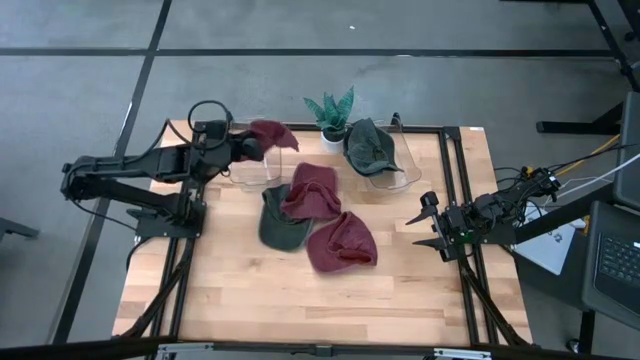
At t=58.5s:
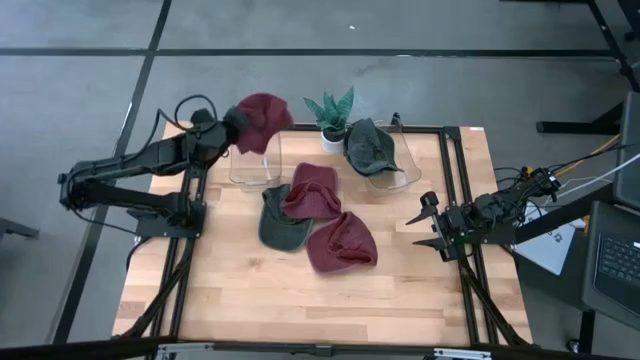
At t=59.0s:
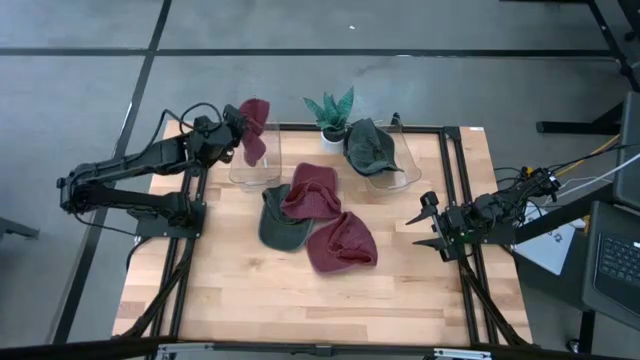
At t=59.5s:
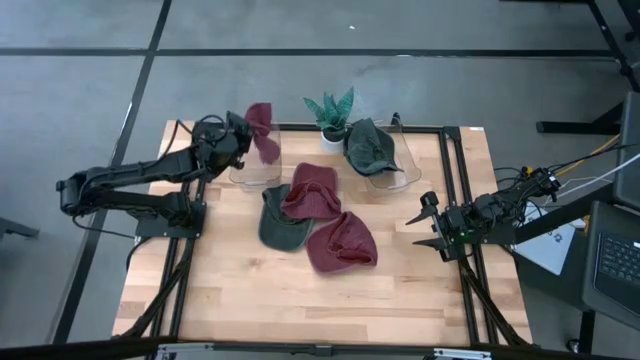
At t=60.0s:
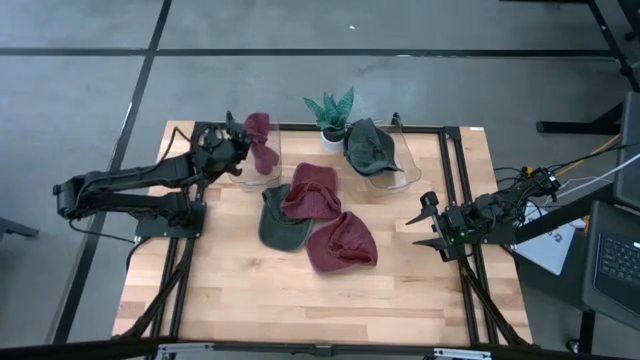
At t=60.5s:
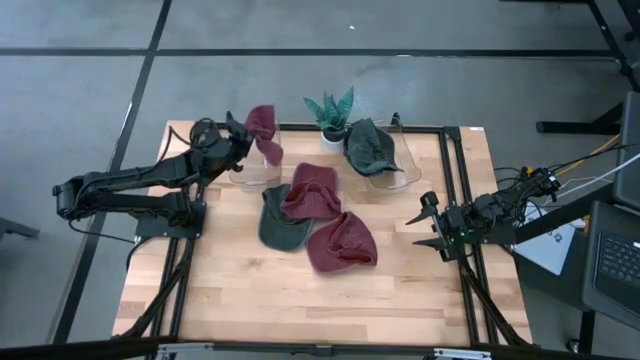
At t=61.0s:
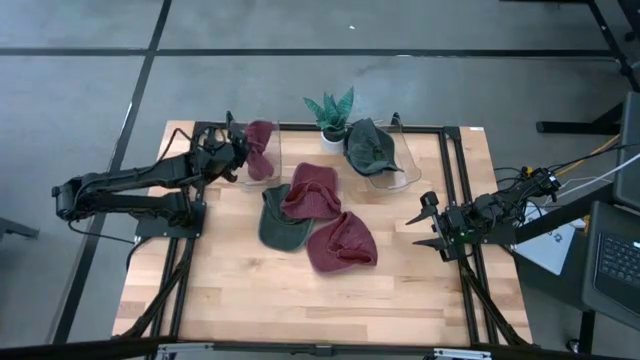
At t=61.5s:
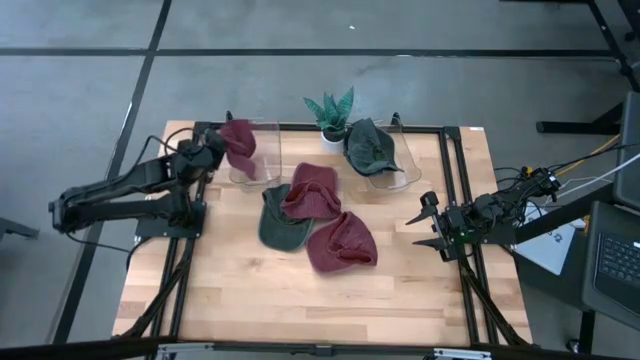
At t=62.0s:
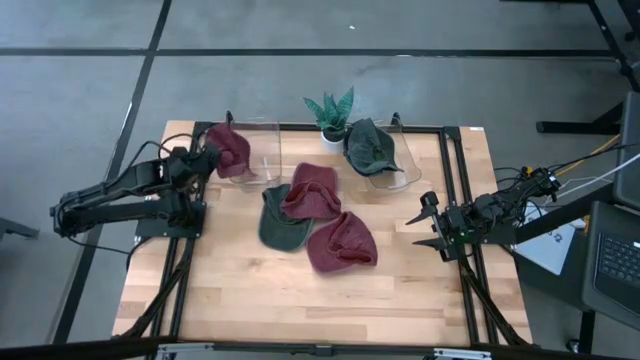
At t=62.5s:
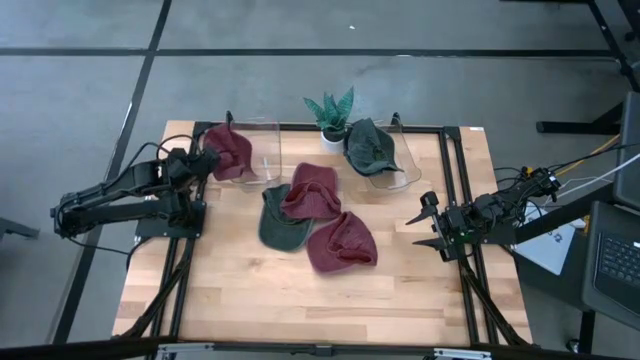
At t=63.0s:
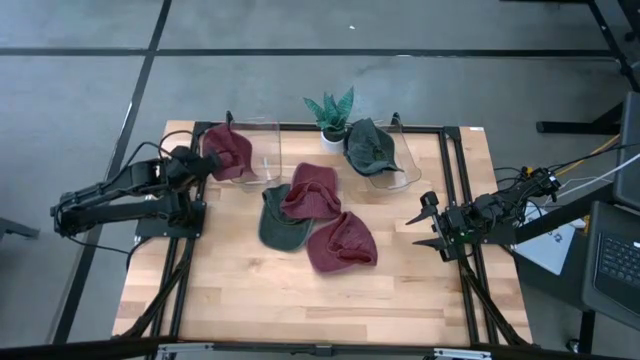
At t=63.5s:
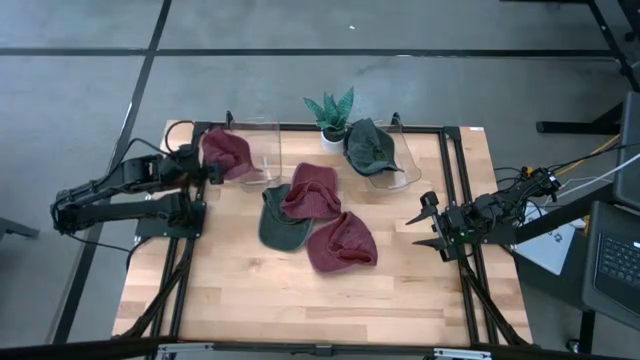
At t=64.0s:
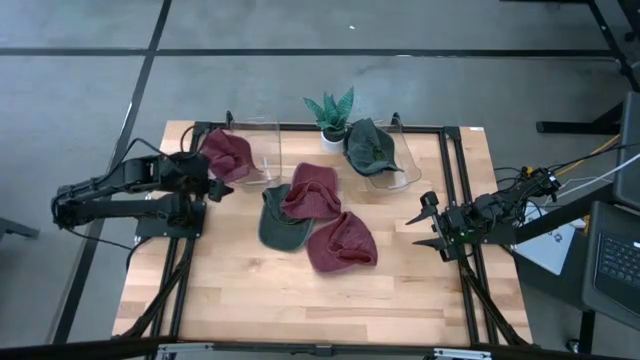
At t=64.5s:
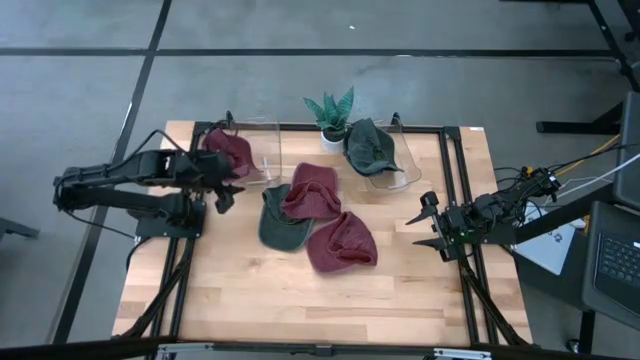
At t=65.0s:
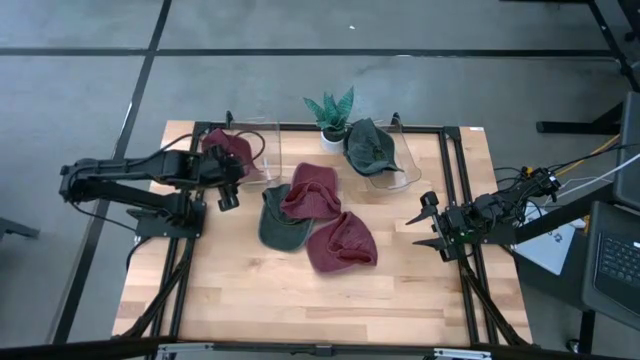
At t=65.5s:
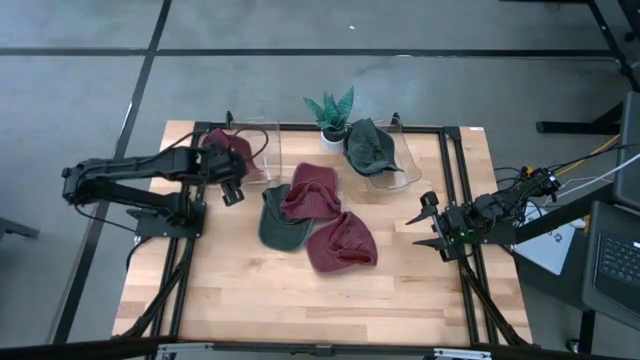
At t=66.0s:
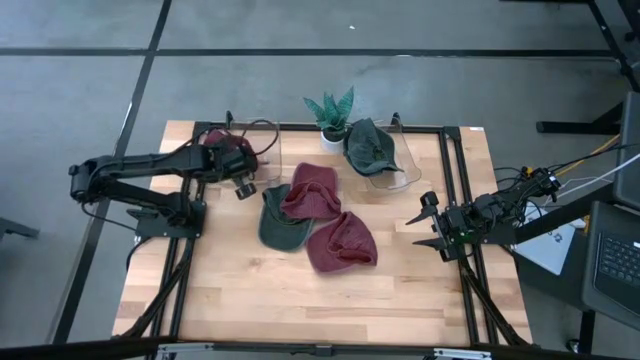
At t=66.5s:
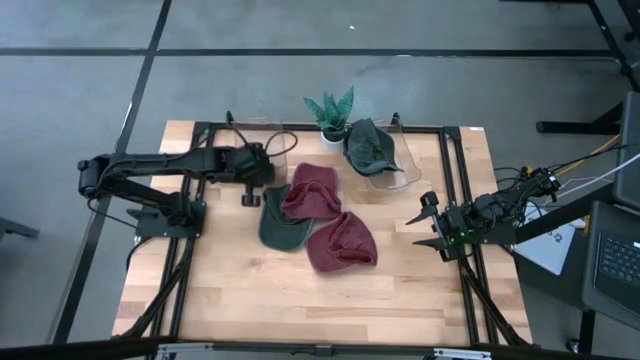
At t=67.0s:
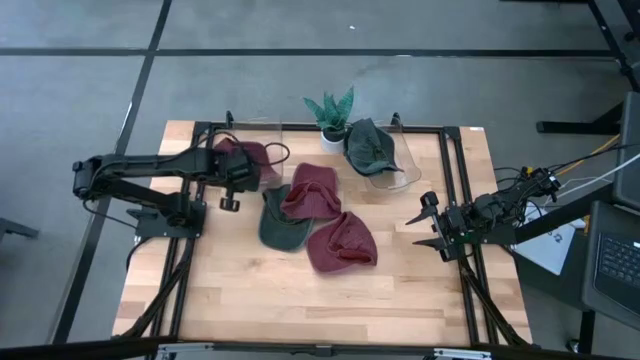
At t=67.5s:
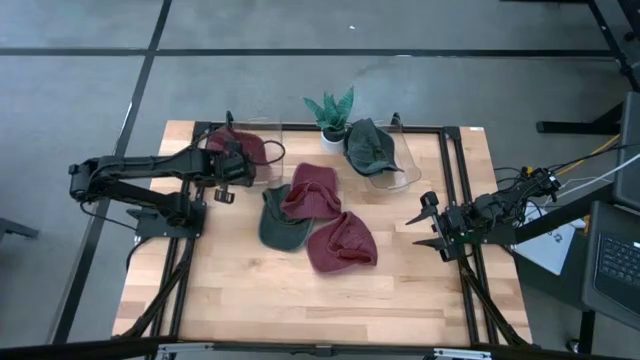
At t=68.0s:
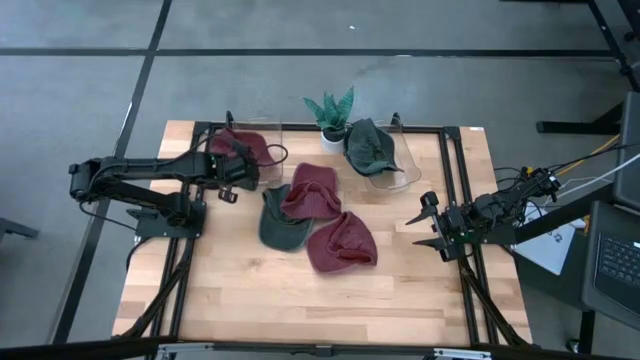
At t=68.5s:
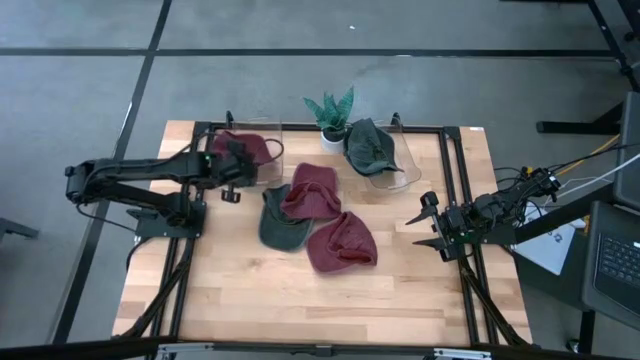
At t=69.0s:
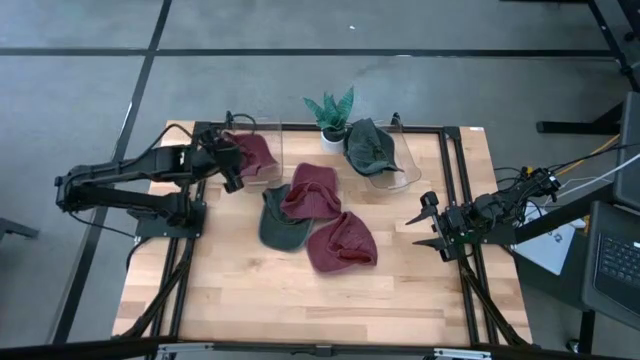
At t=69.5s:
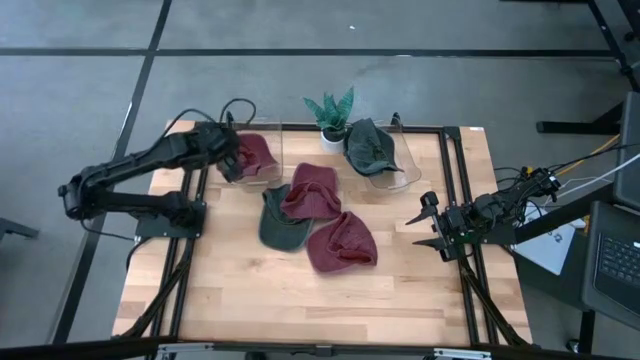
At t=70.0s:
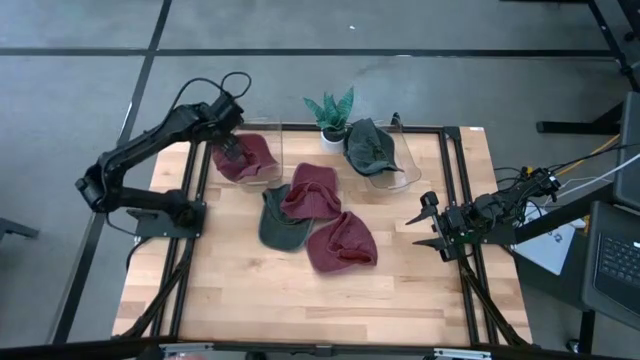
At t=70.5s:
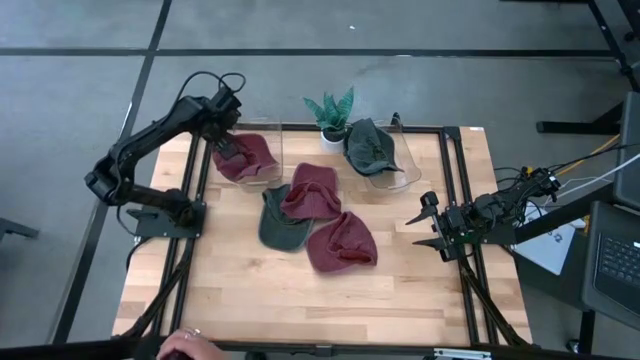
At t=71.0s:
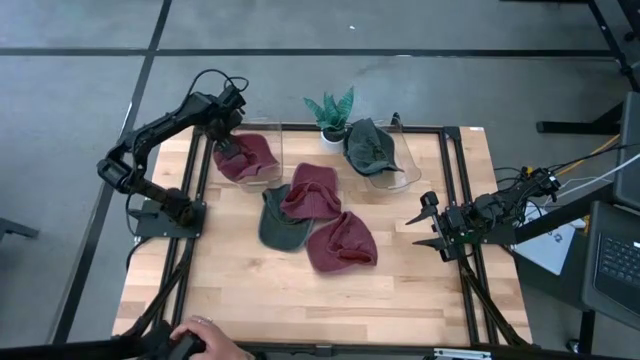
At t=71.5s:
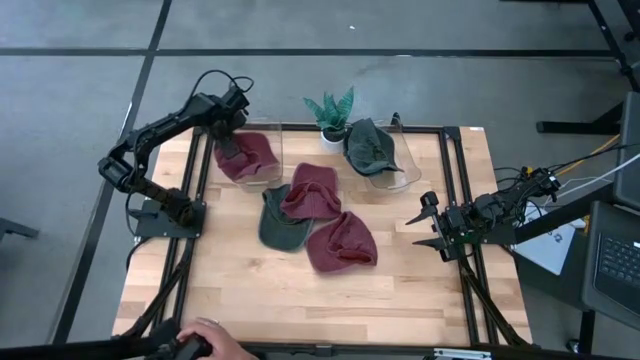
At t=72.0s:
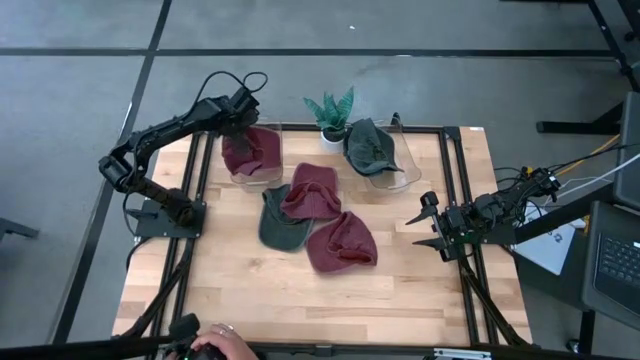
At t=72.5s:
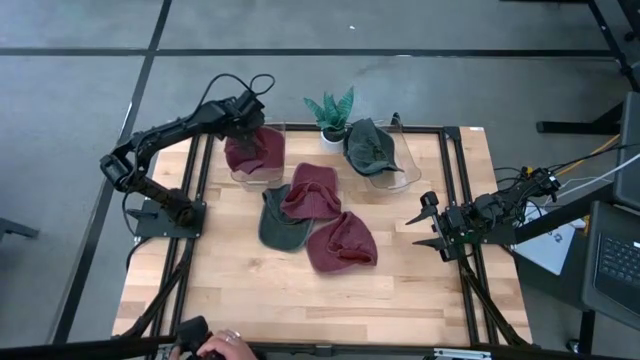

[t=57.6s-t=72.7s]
Task: Pick & Place hat
Put the bottom red cap into the left bin

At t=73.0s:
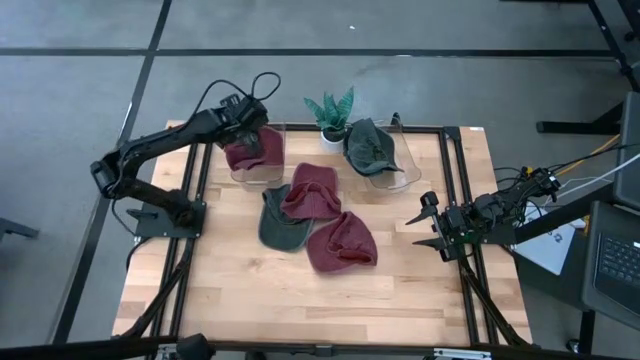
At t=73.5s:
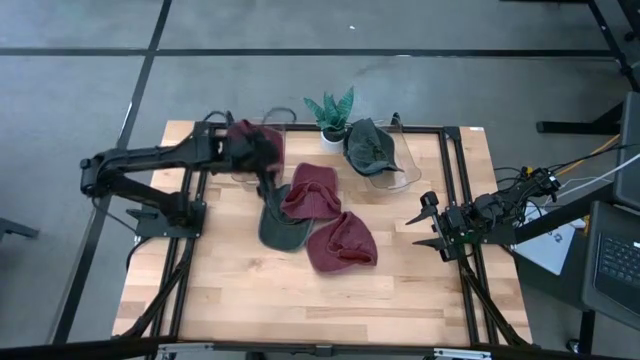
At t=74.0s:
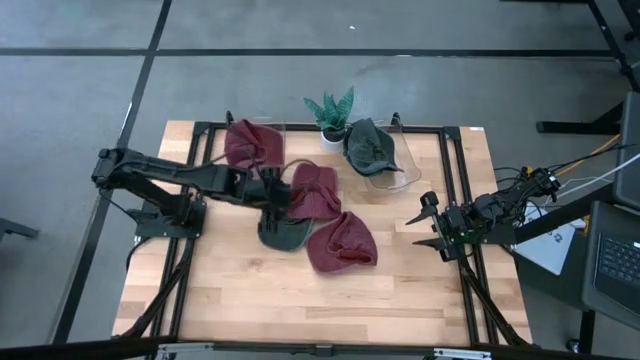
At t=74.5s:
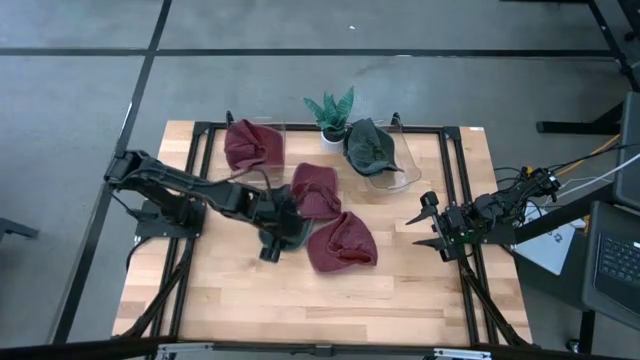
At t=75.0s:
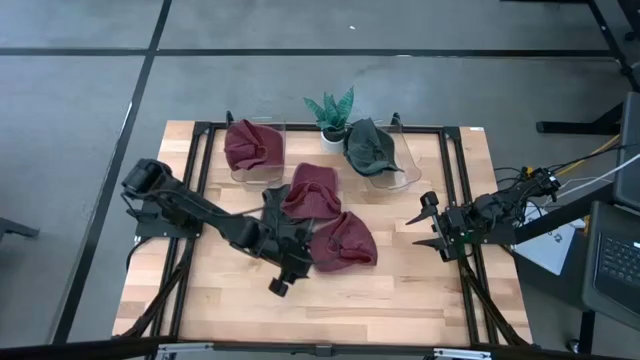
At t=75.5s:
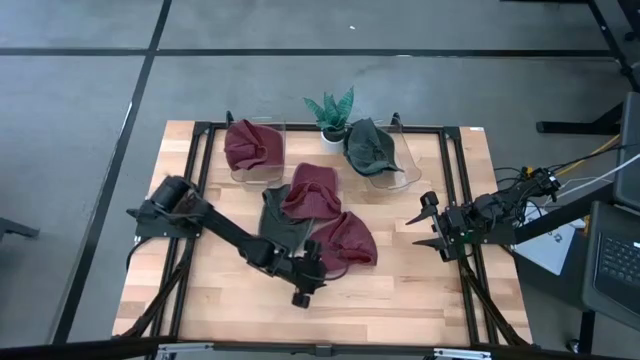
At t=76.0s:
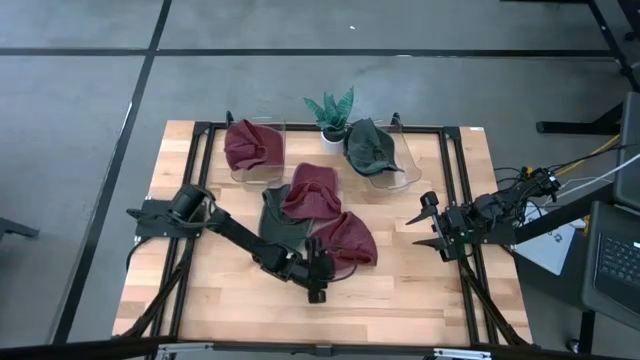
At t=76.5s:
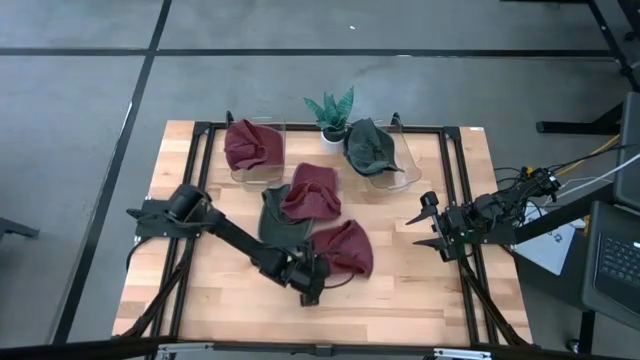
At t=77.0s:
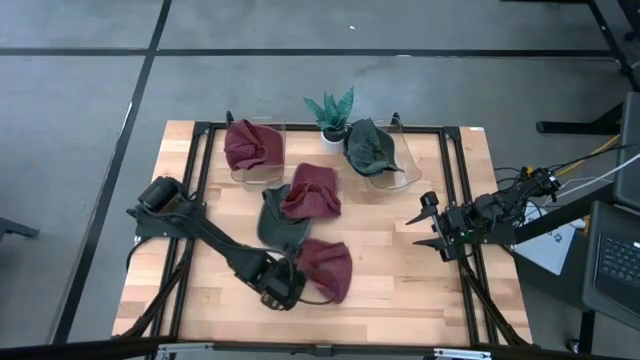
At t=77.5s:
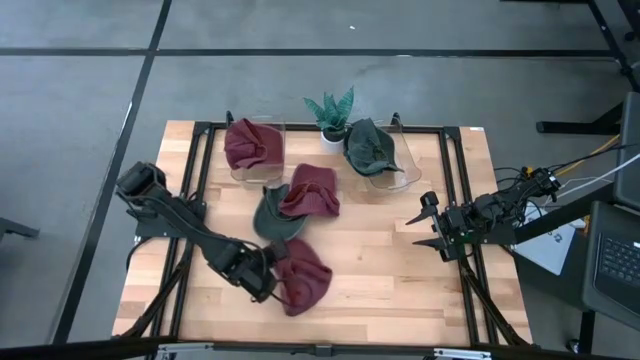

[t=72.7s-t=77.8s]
Put the bottom red cap into the left bin
